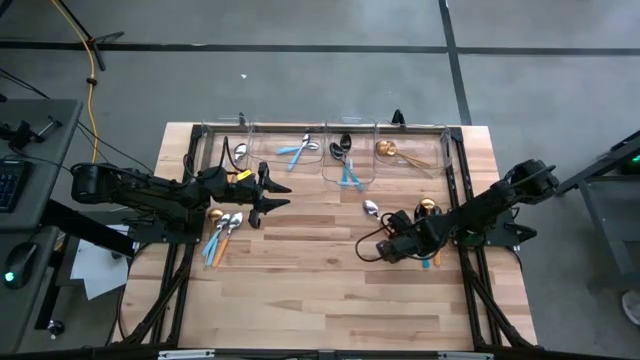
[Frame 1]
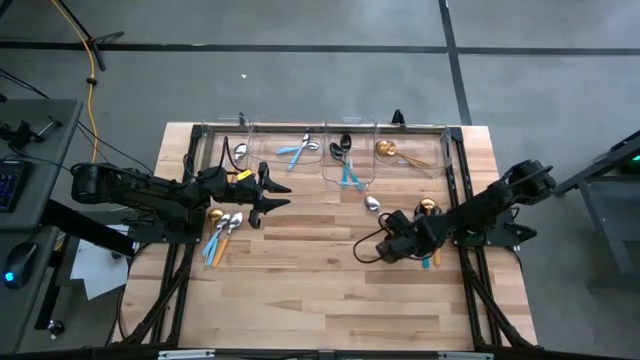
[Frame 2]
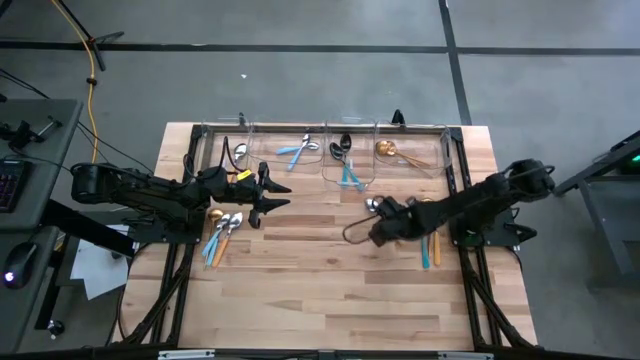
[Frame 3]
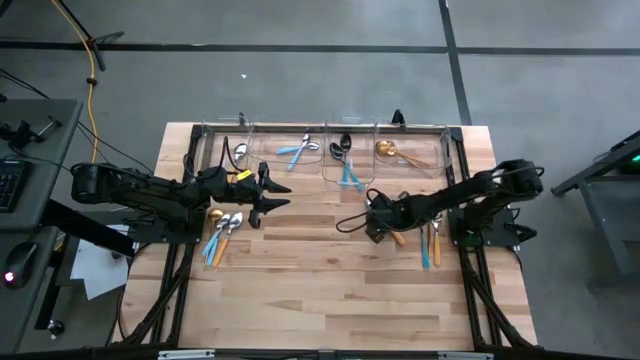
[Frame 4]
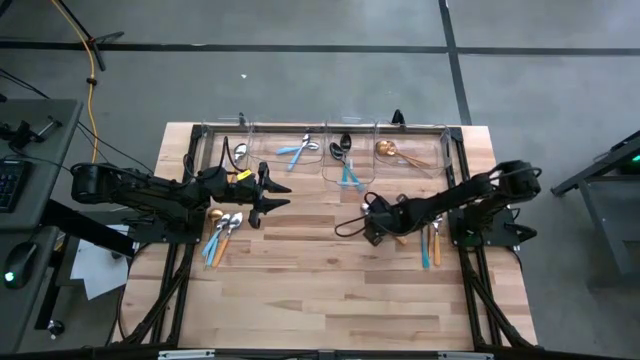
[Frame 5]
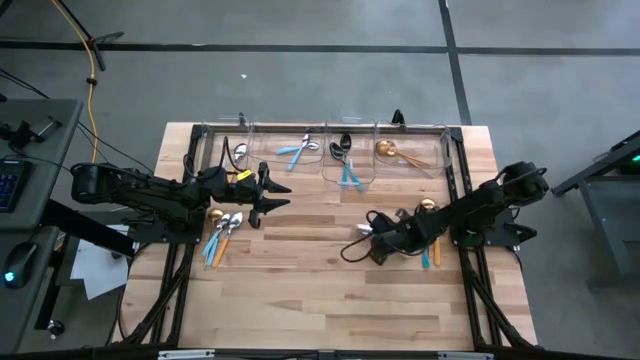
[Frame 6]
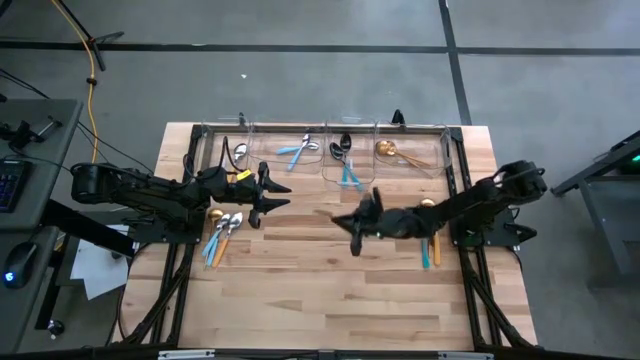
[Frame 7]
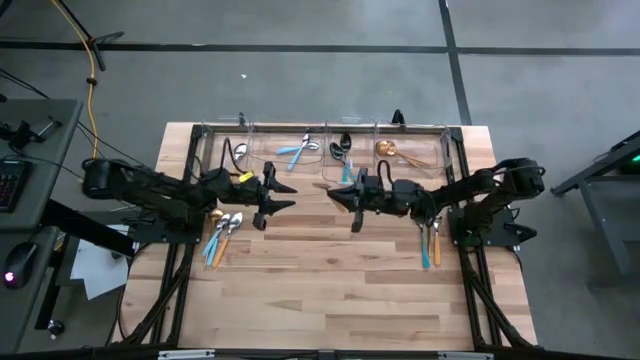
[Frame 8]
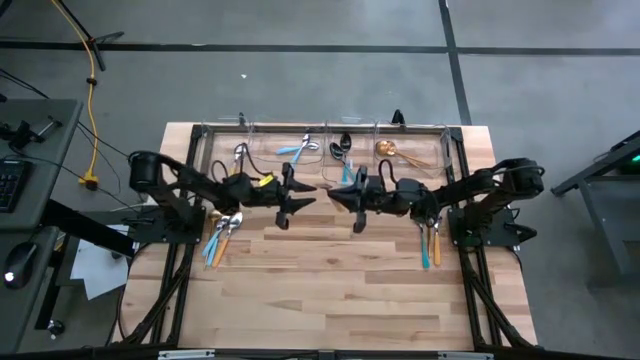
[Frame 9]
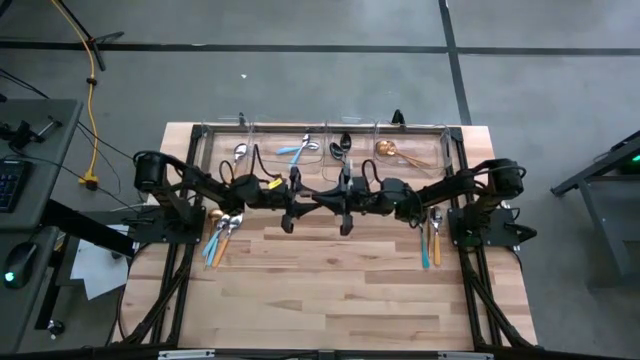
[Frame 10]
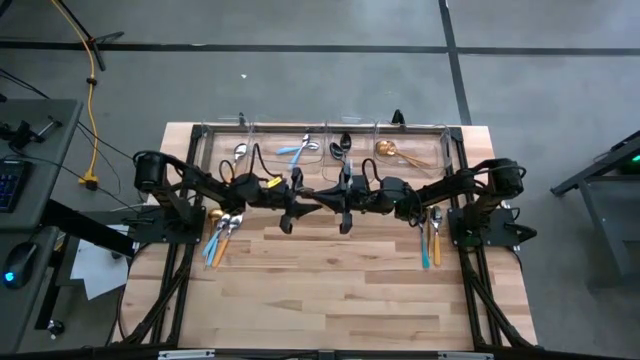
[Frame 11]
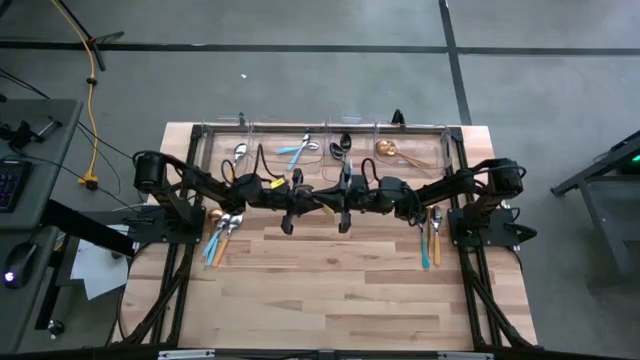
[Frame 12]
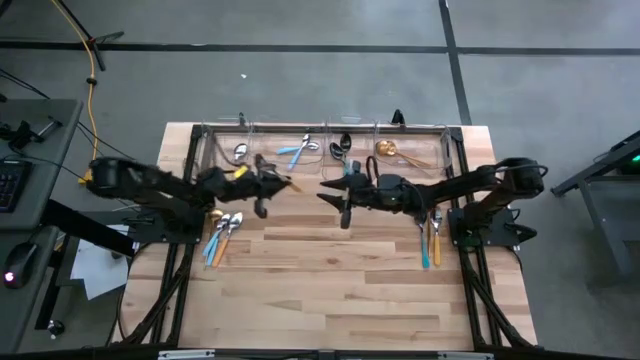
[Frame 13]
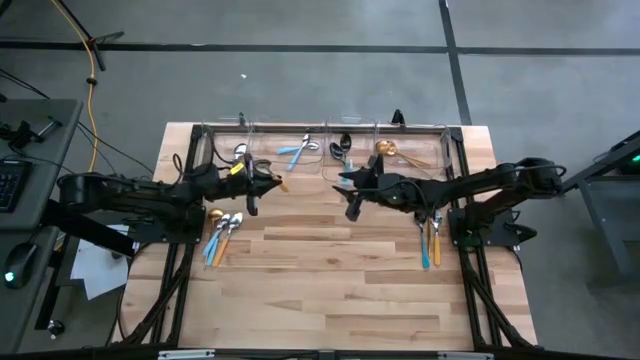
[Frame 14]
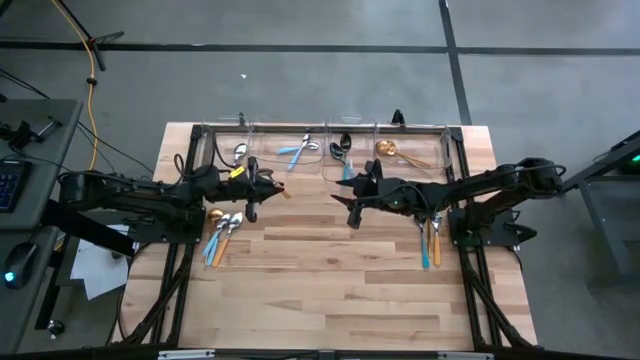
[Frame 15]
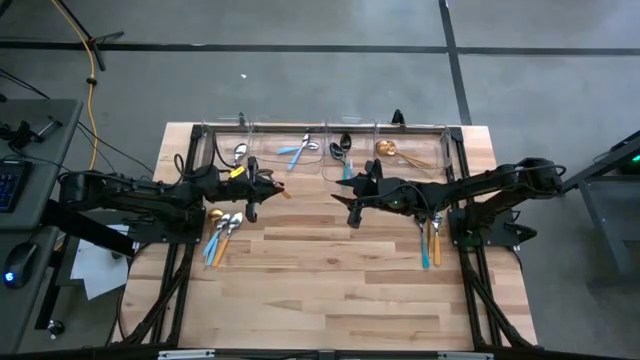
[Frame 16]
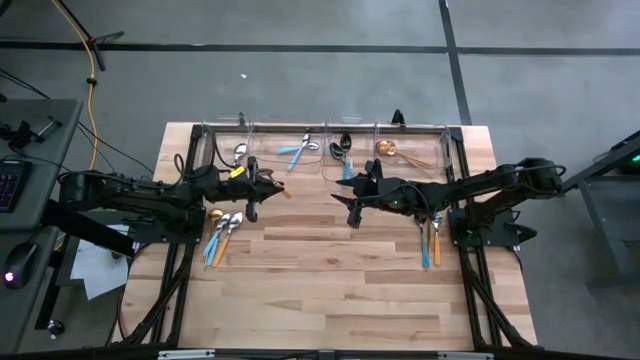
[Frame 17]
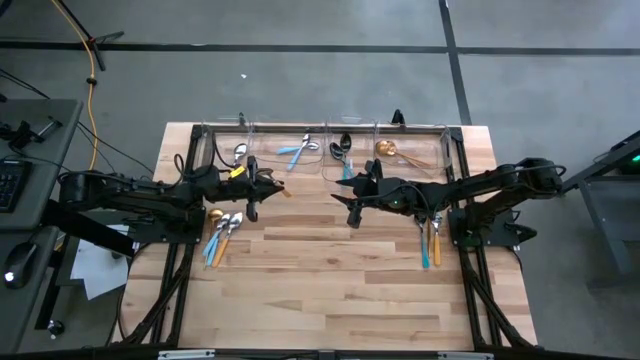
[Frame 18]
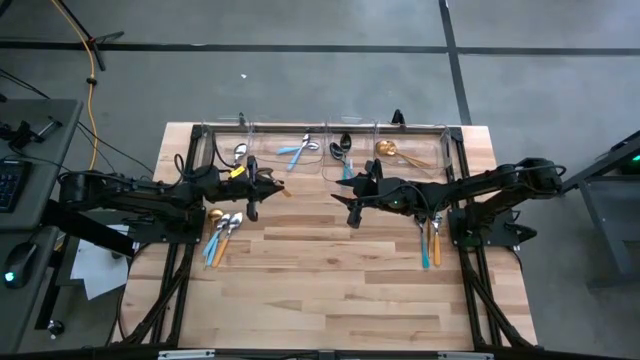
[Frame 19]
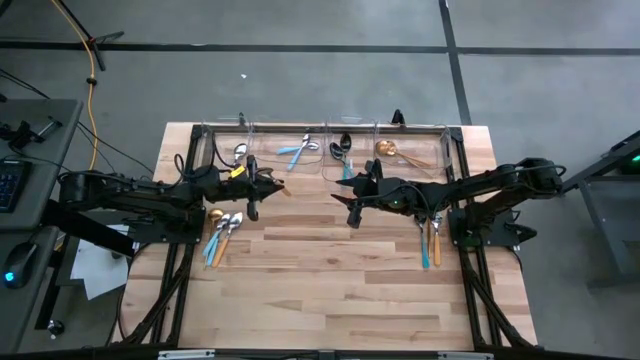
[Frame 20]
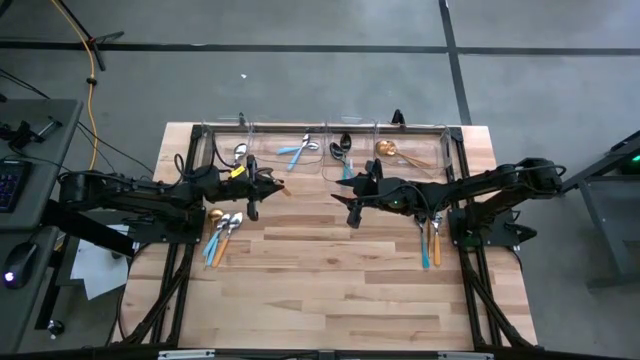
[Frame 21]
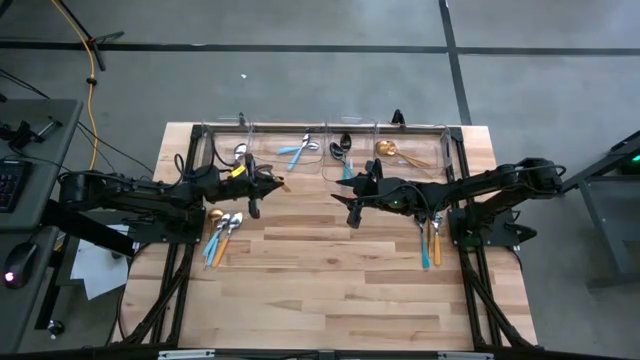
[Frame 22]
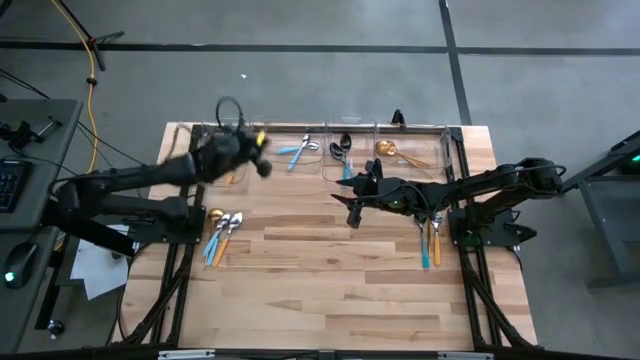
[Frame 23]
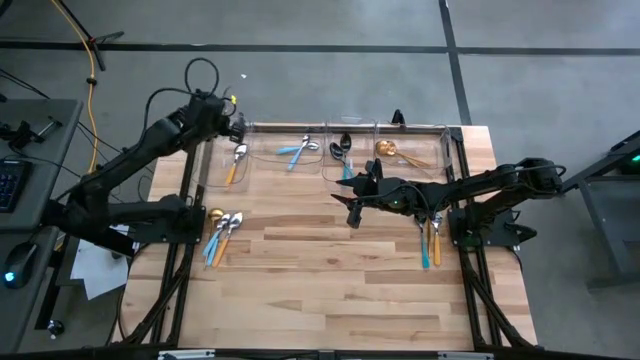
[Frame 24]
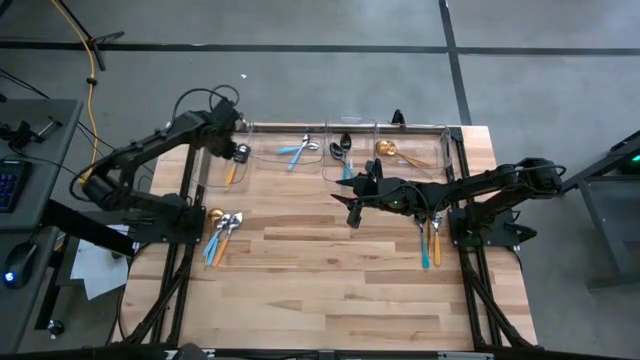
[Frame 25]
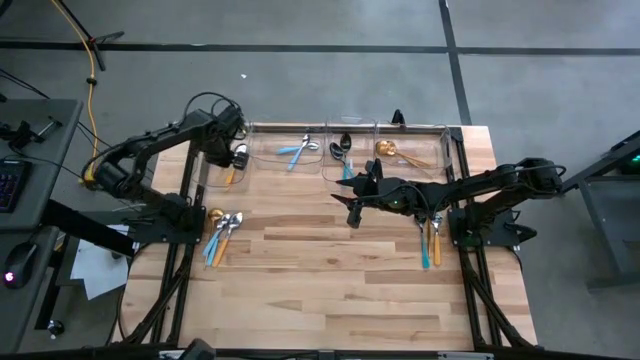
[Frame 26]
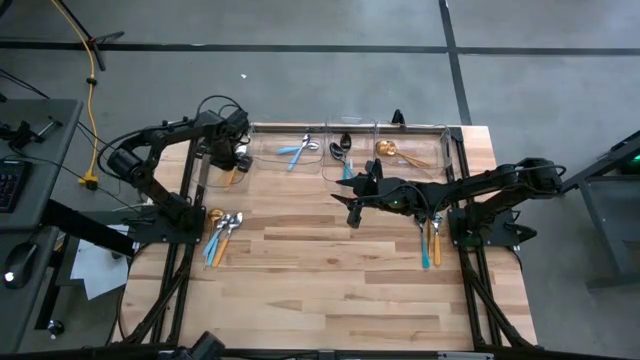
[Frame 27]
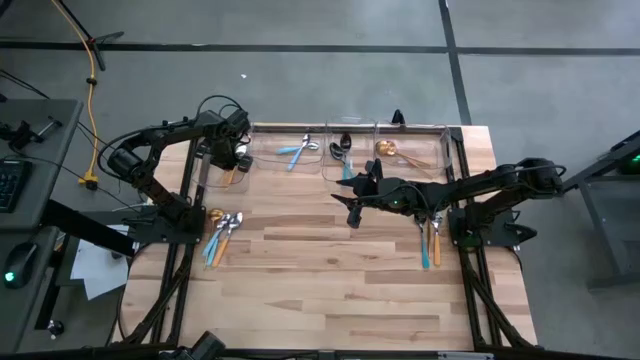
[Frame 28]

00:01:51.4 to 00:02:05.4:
Task: Sort silverware by color (type)
Put the yellow spoon into the left transparent bin

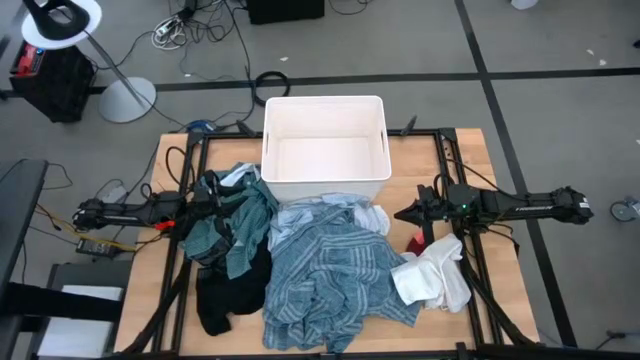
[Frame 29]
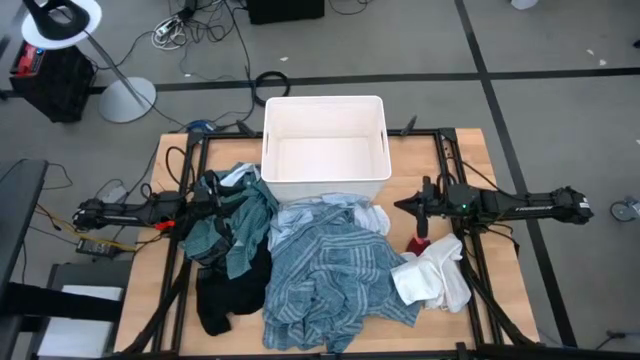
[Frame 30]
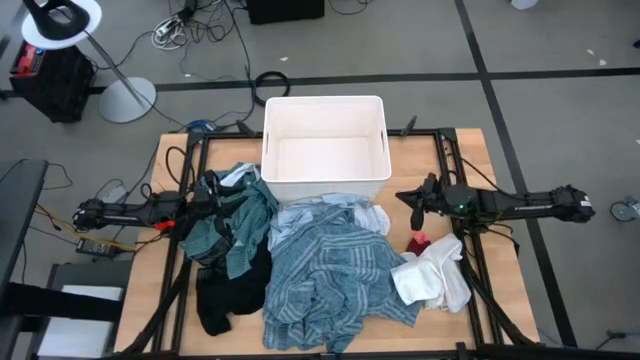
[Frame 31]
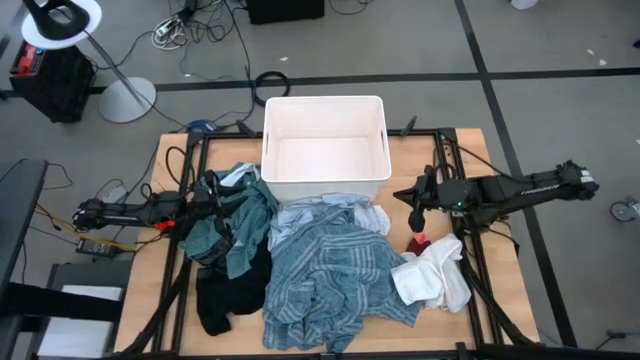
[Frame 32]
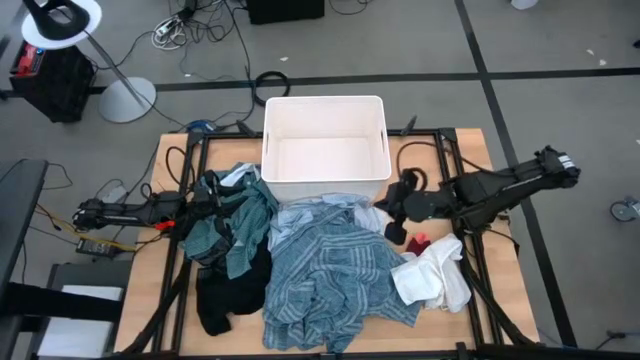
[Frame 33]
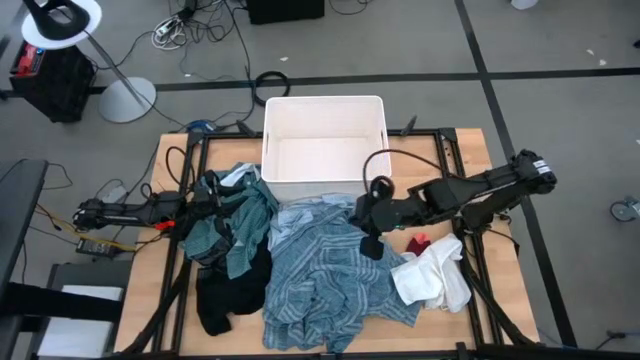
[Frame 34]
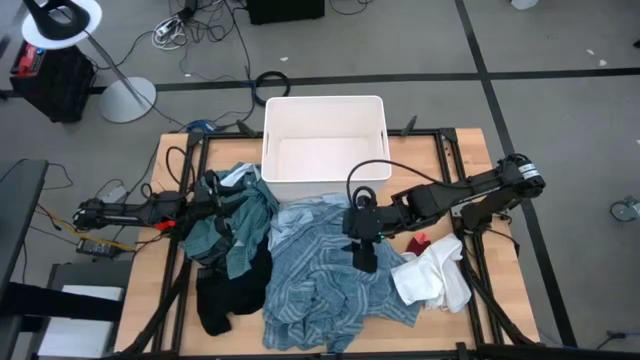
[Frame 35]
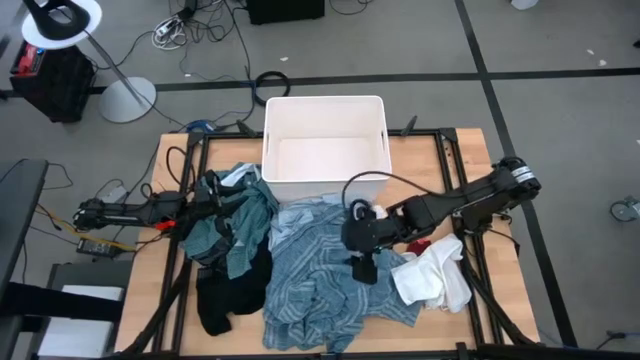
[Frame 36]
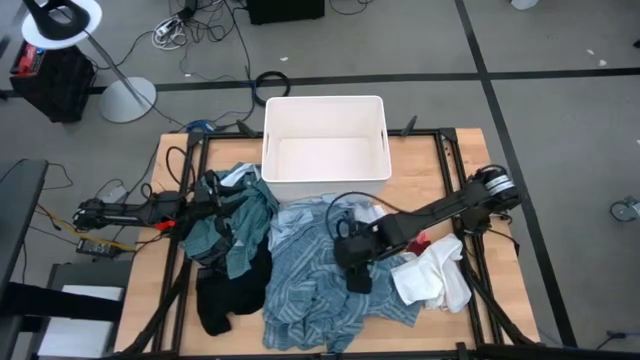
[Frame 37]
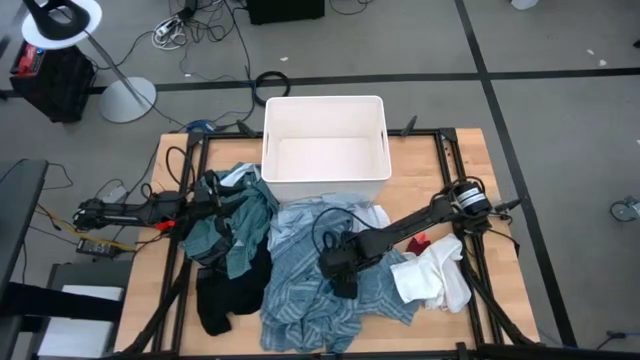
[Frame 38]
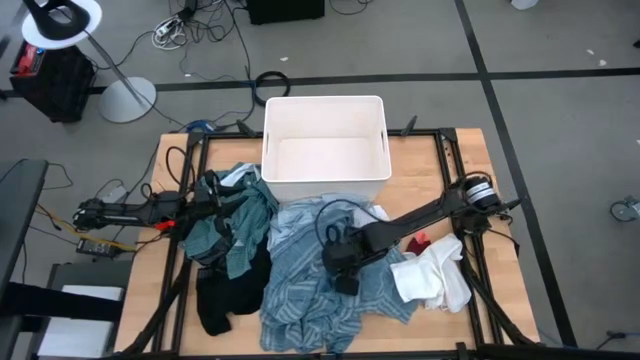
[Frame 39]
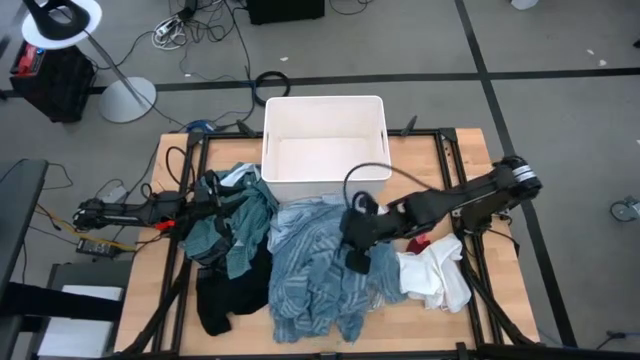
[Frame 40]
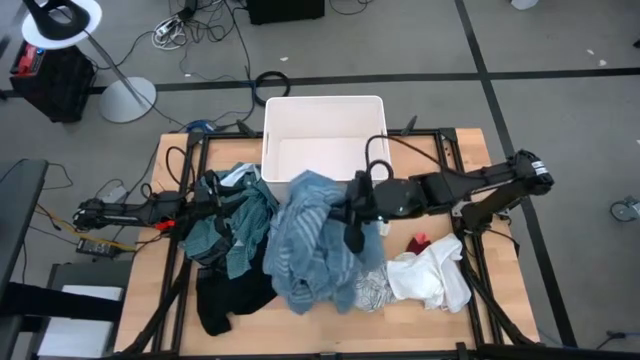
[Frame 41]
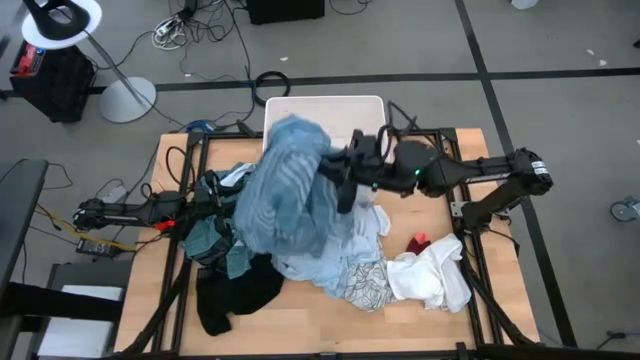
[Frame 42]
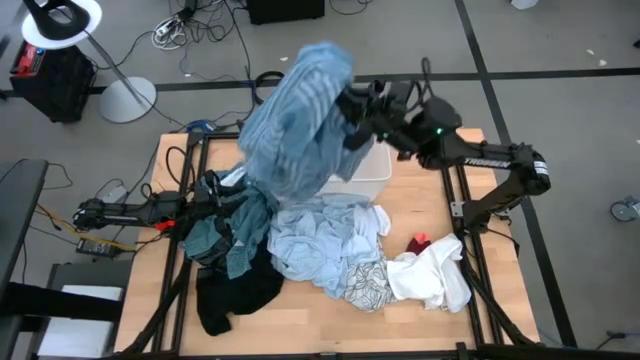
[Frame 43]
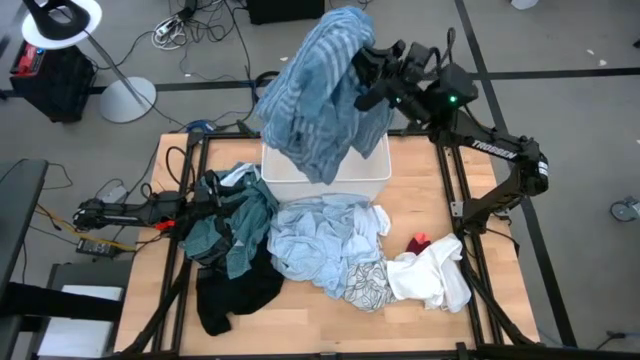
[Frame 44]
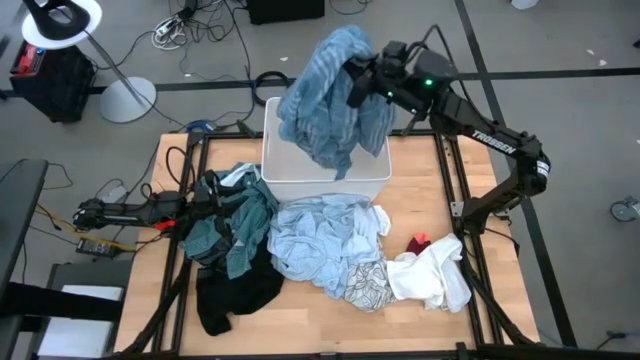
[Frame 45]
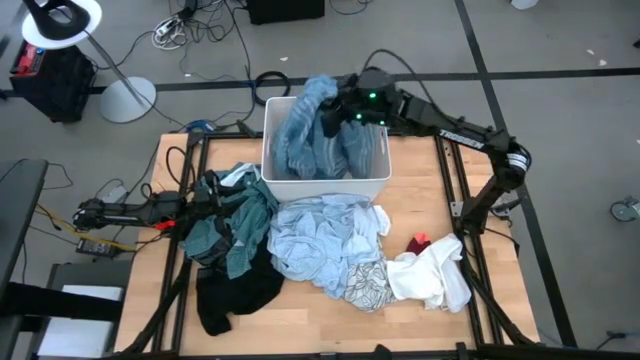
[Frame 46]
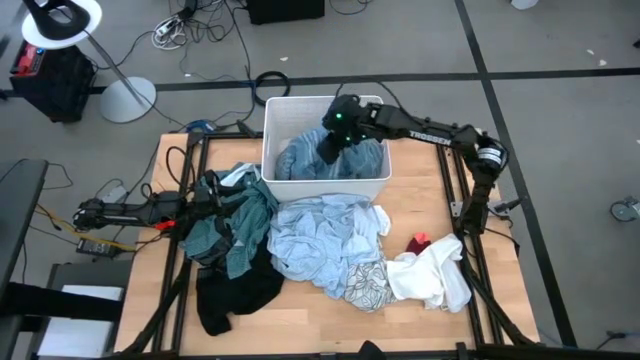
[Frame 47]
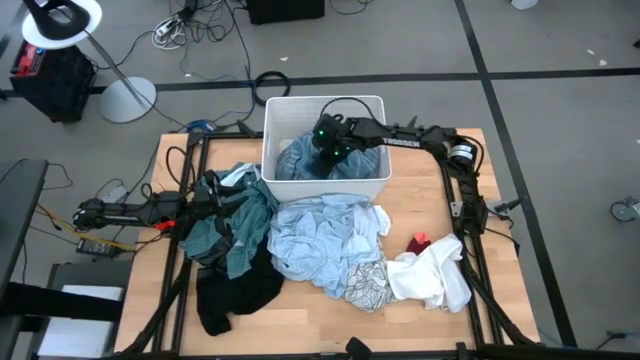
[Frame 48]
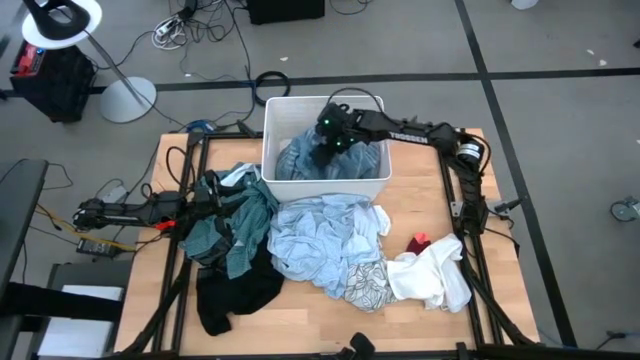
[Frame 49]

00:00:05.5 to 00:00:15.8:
Task: Sort clothes
Put the blue blanket into the white laundry bin
